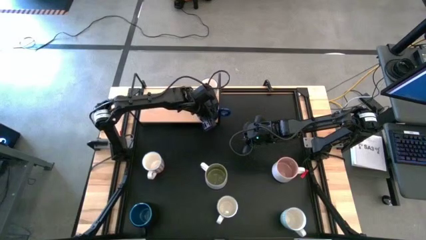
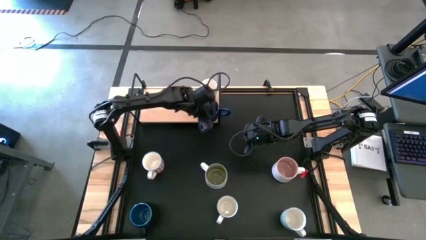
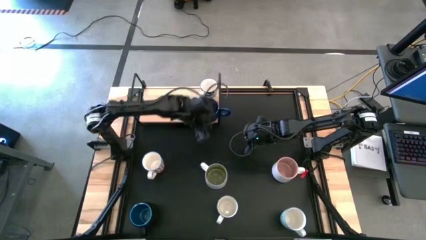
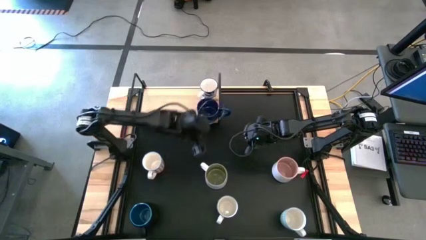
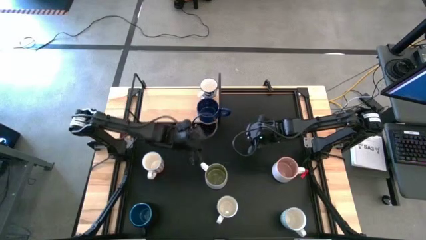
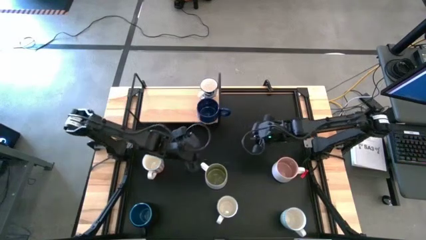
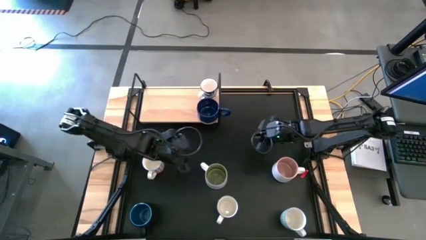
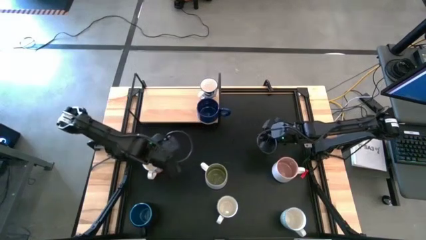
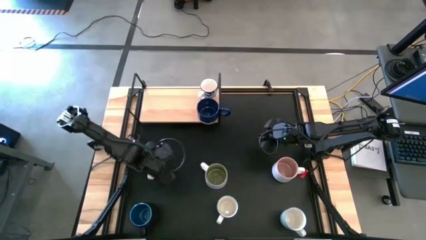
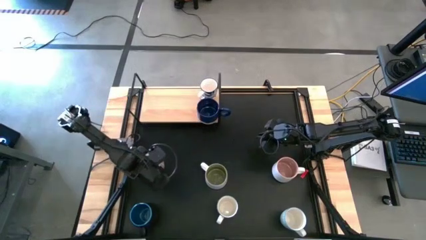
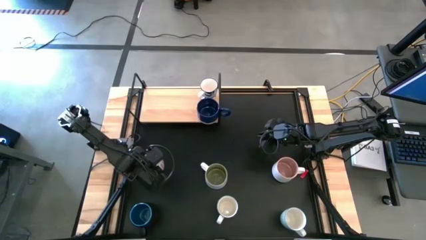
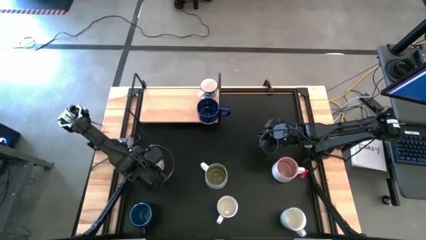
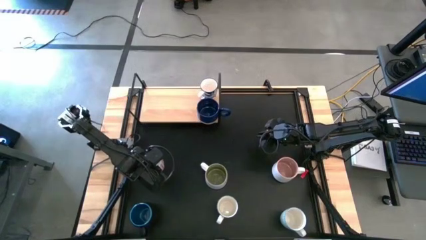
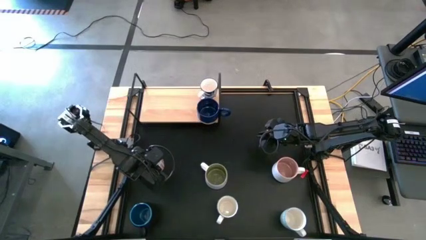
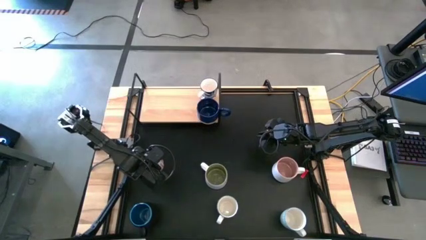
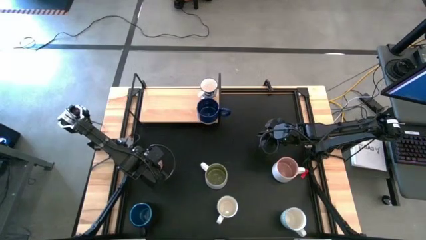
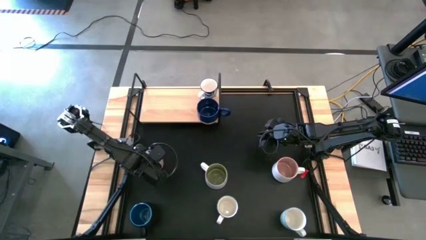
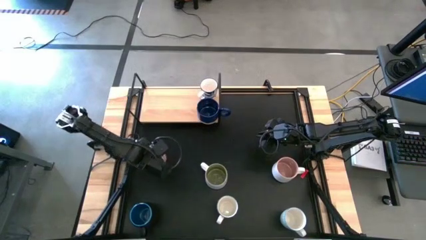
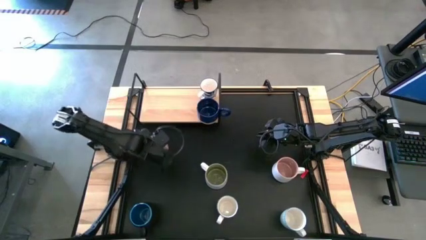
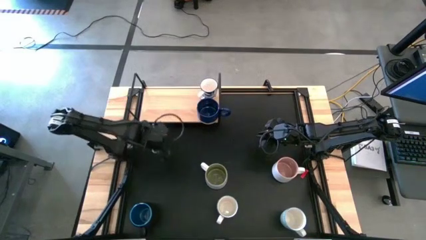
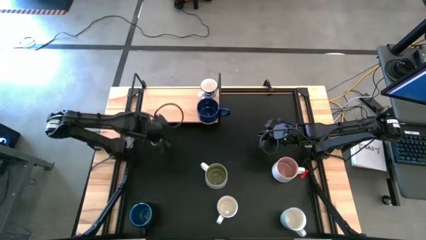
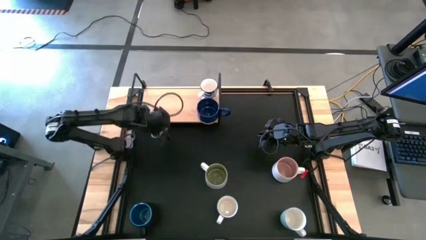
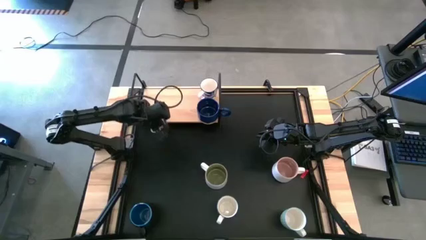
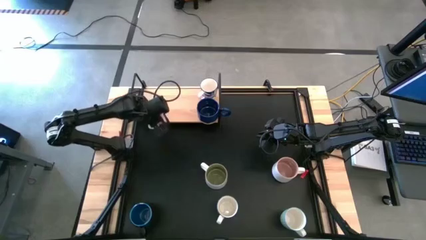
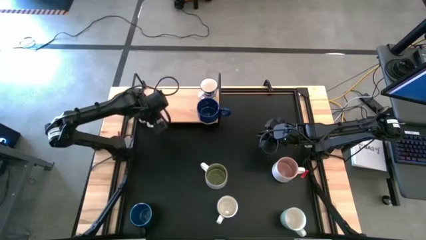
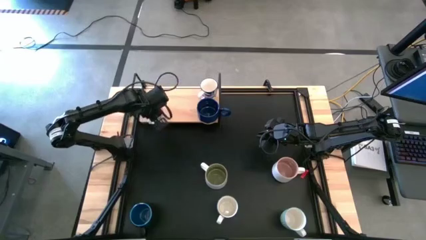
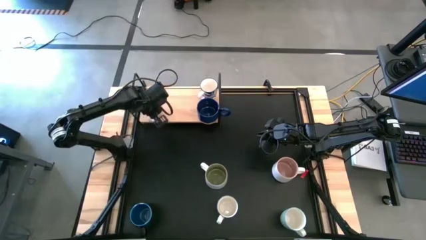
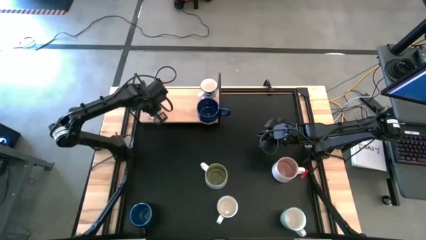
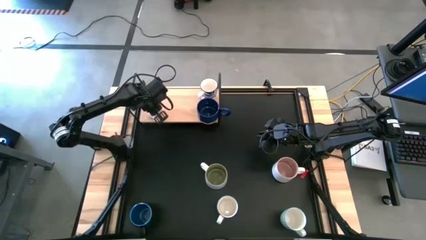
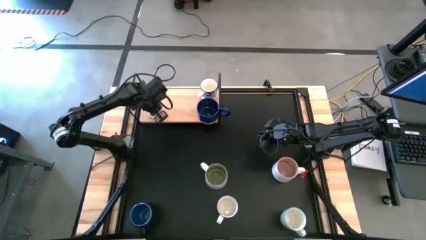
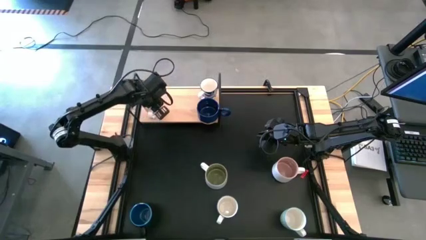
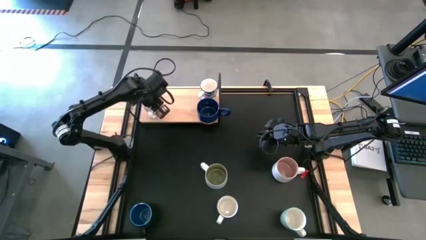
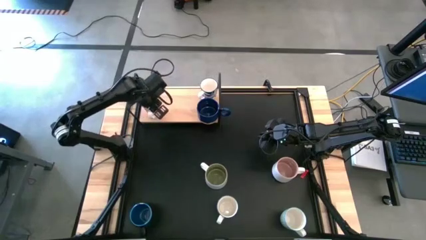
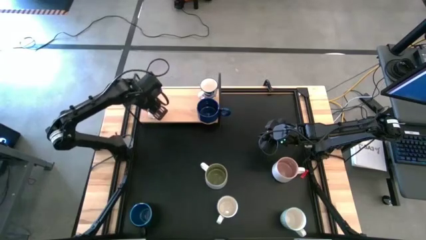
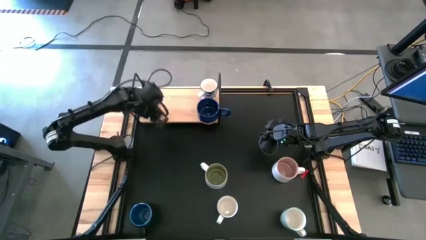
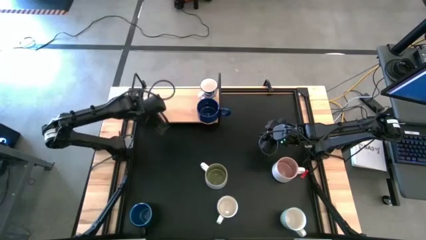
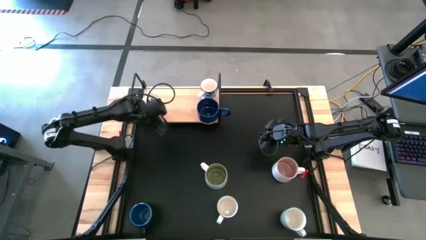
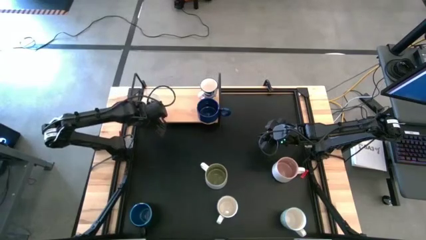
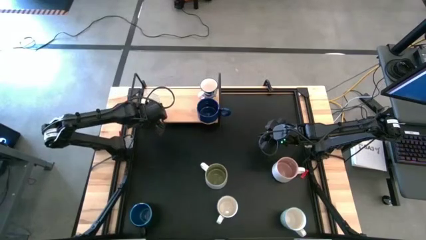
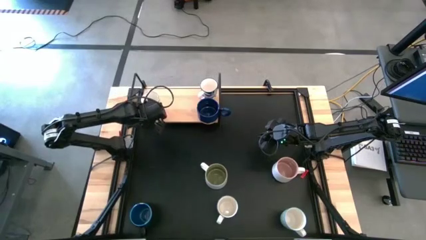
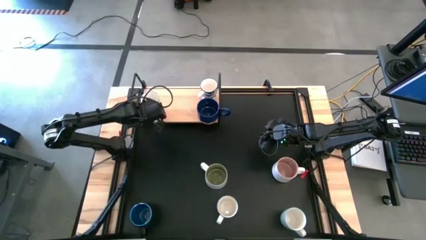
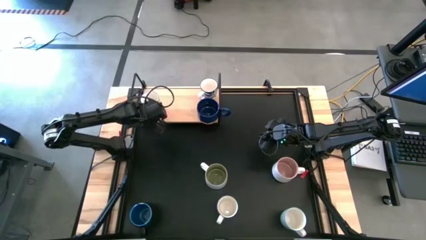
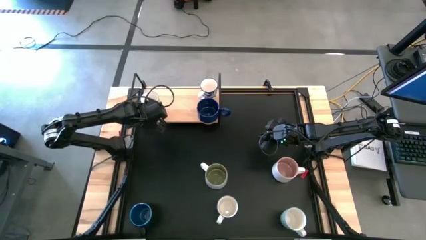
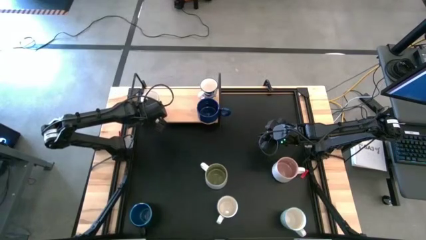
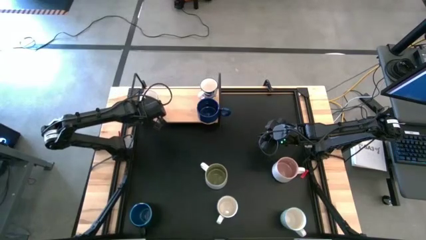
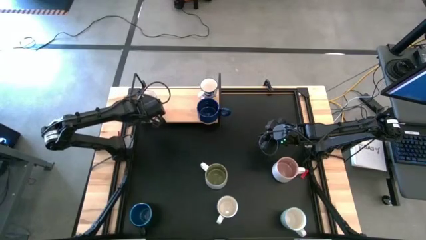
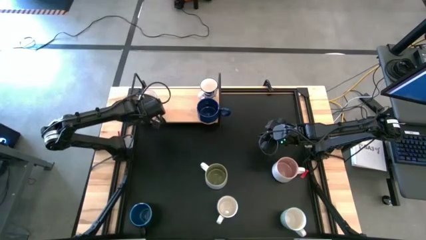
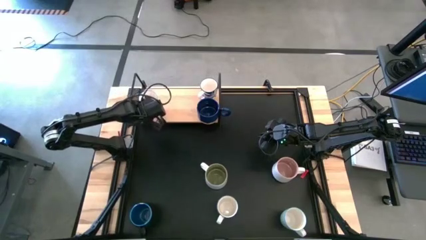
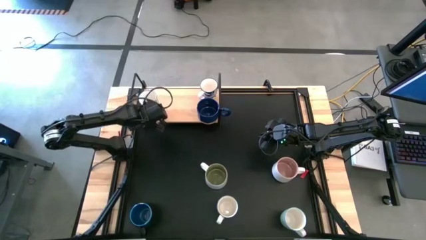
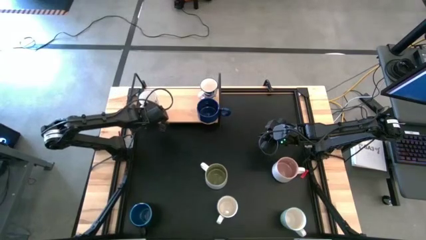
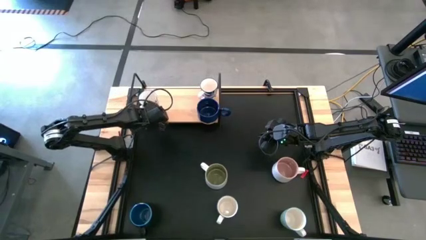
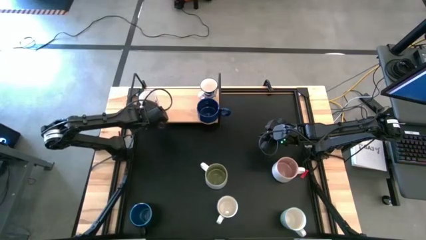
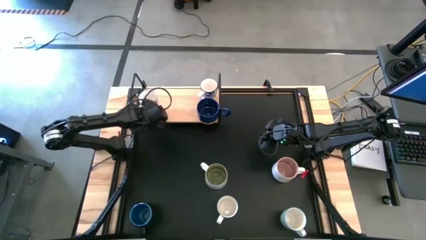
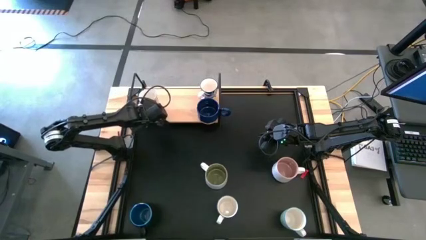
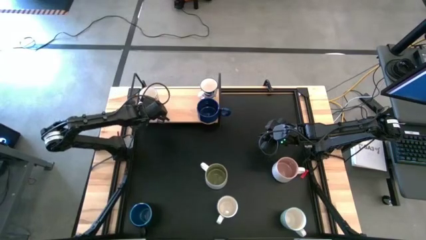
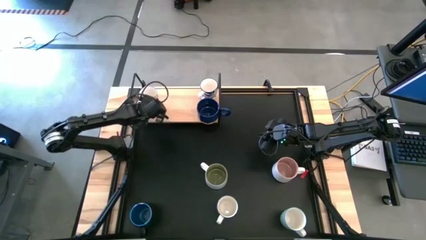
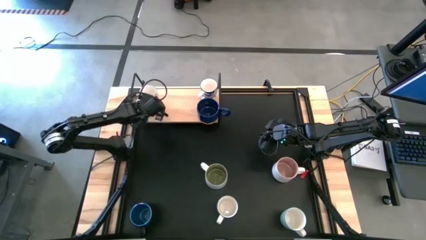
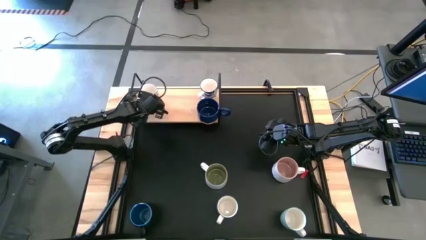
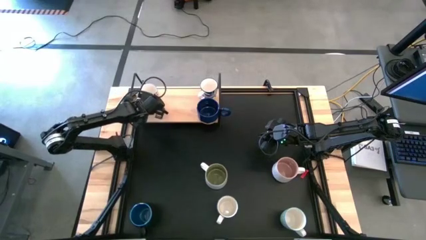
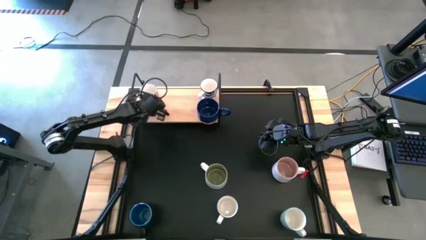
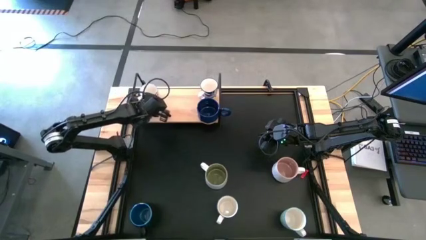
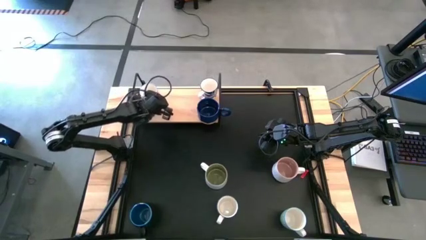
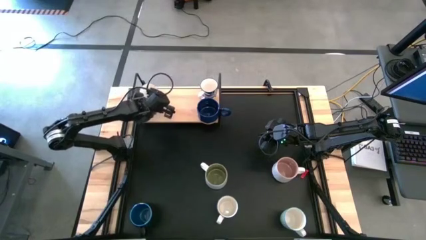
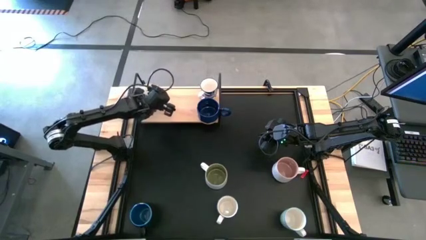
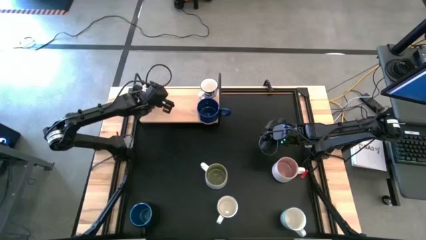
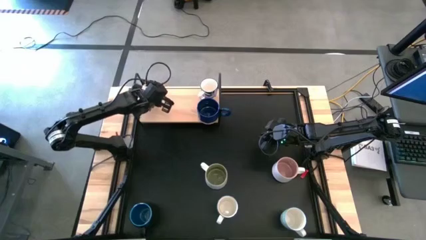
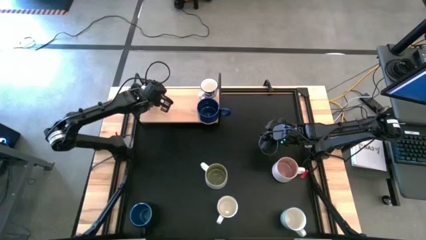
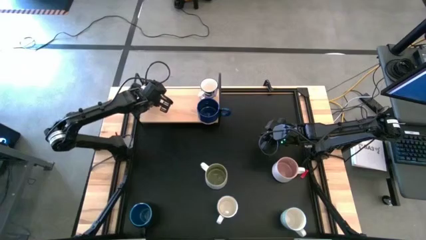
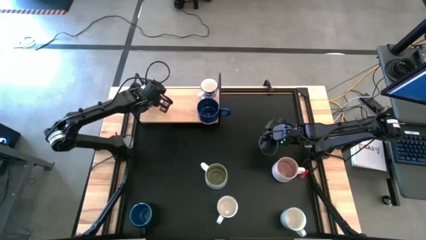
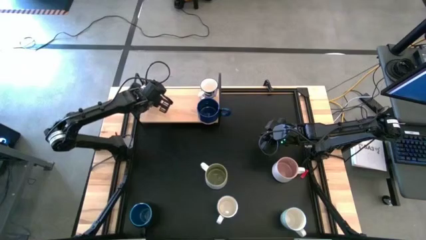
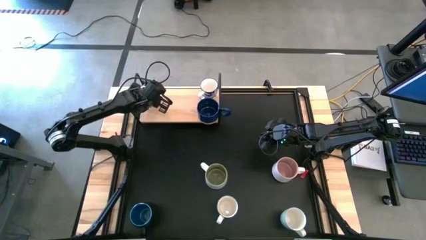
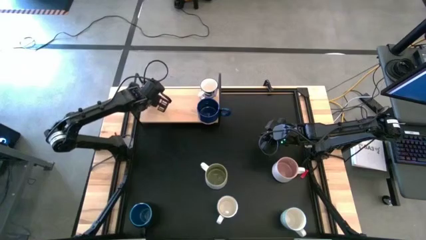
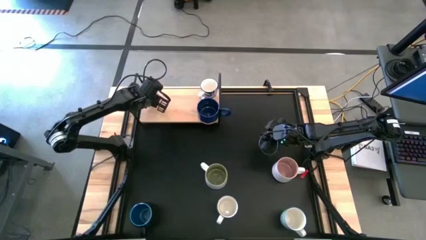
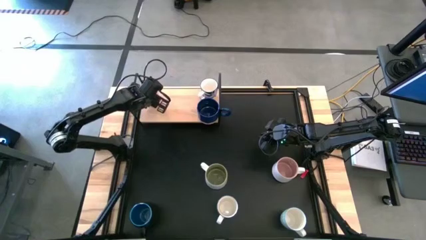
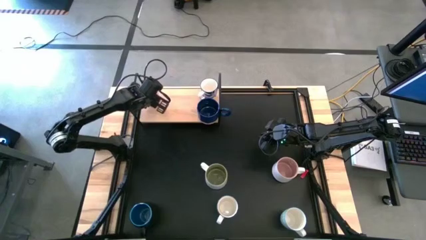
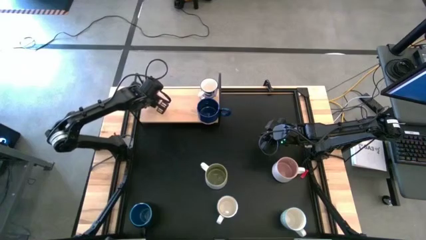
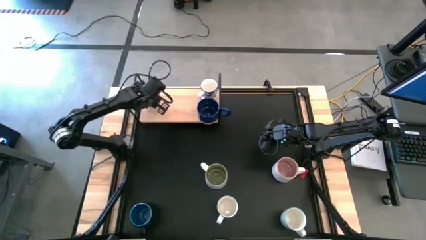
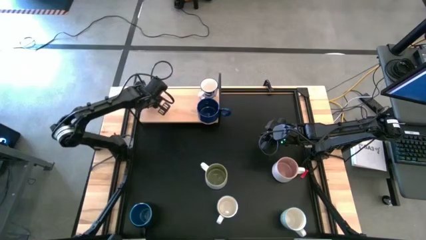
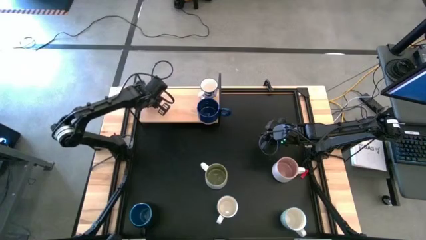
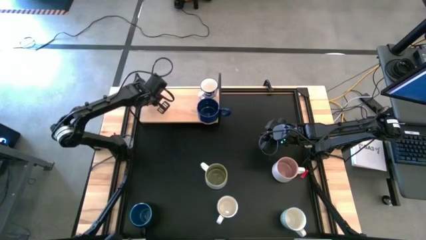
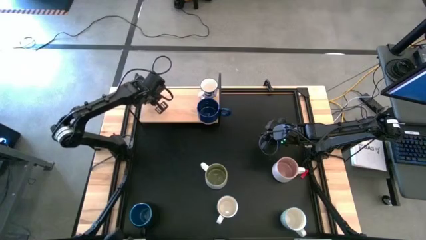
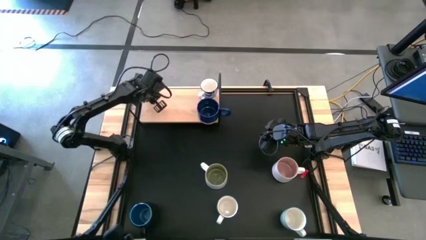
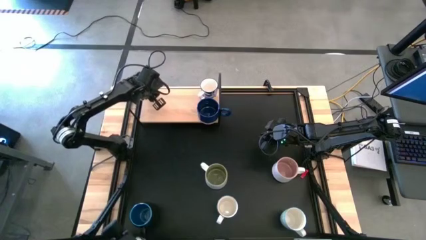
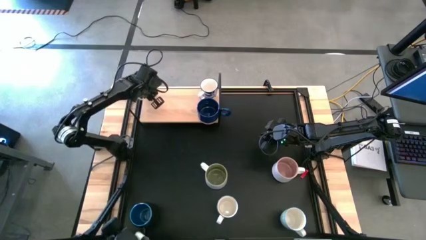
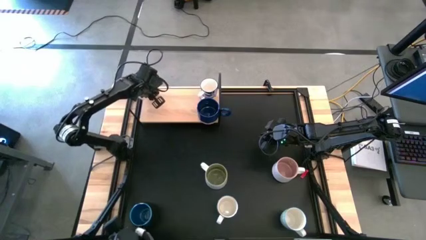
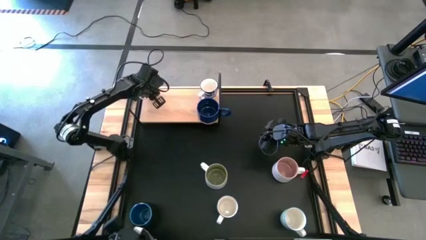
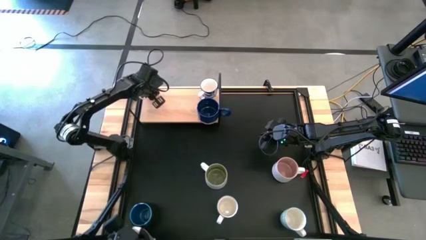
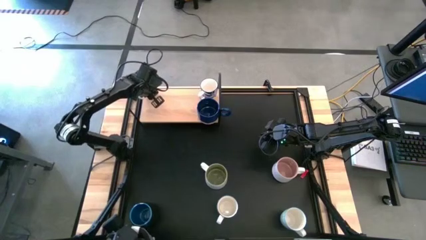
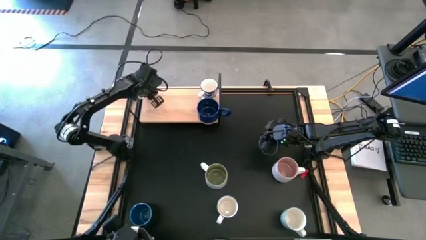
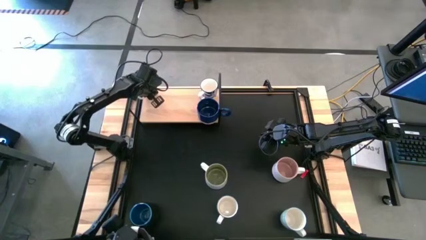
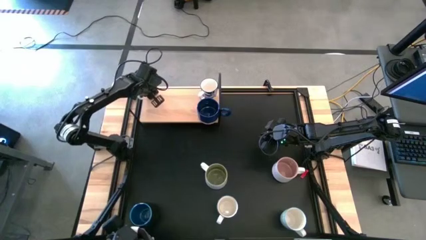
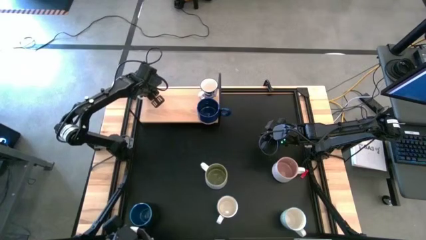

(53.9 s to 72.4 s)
Task: Place coffee mugs
Put the red patterned mug on the shelf
